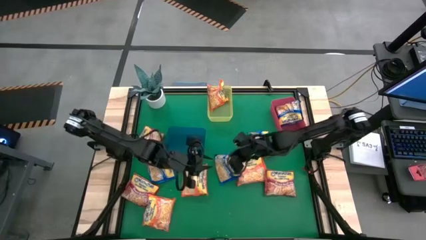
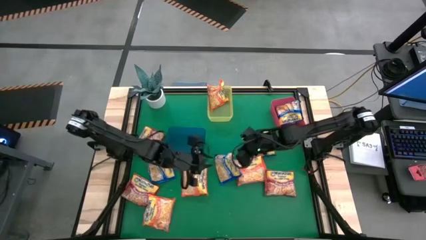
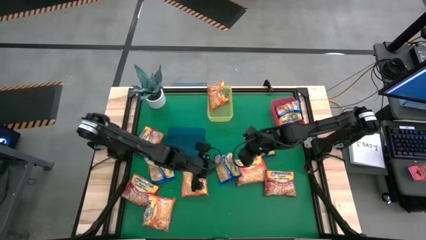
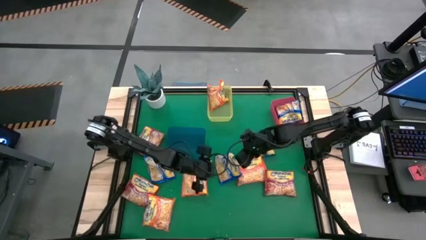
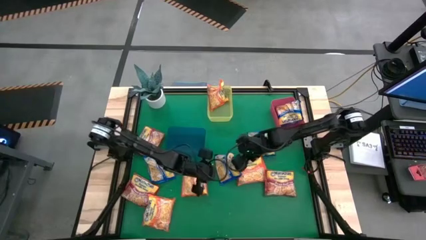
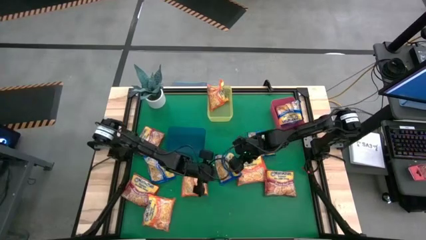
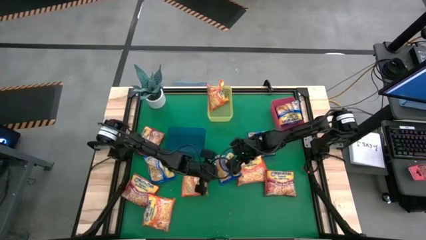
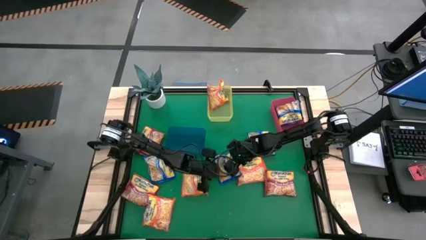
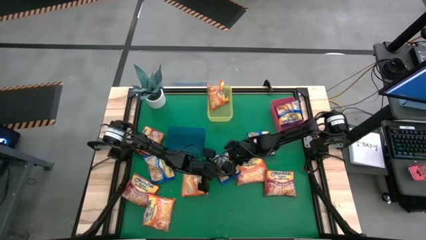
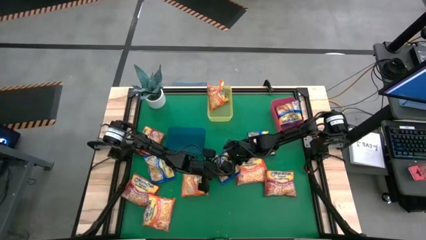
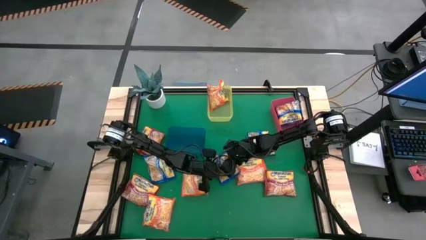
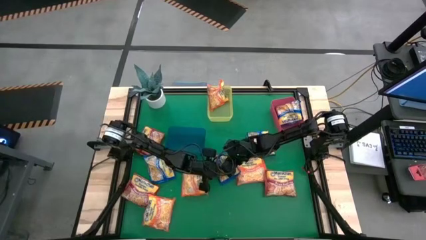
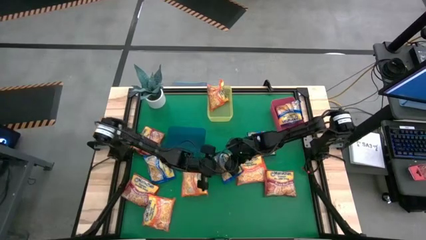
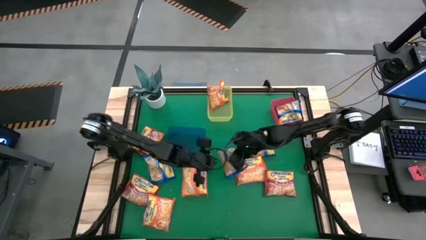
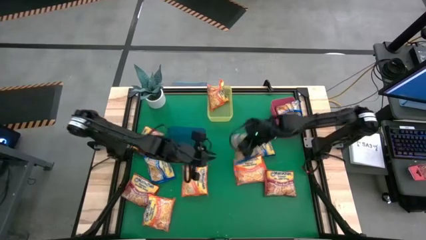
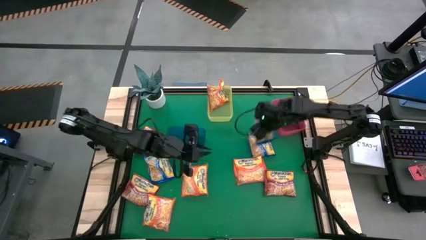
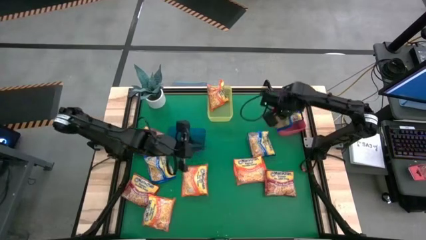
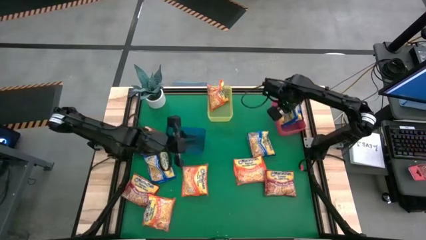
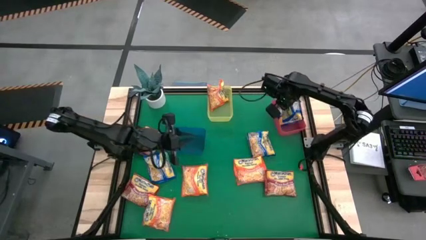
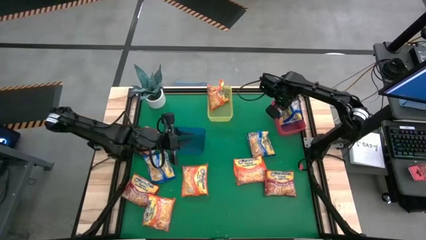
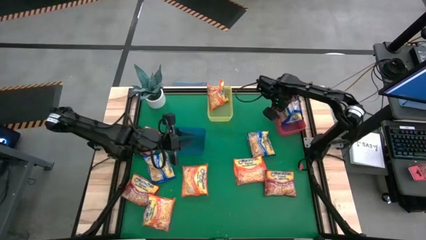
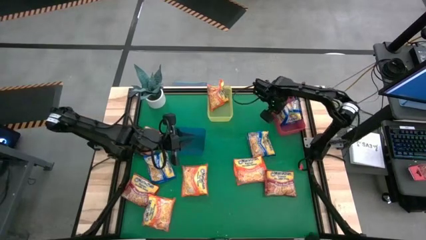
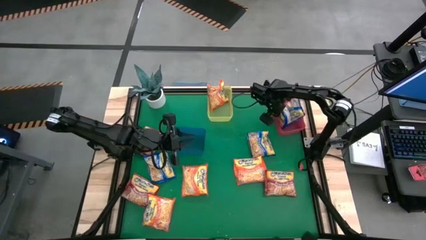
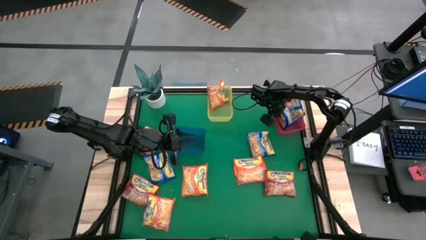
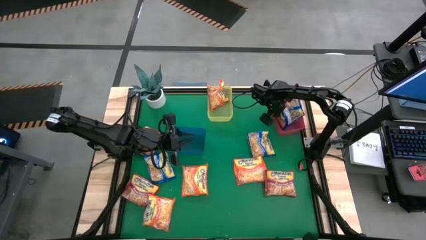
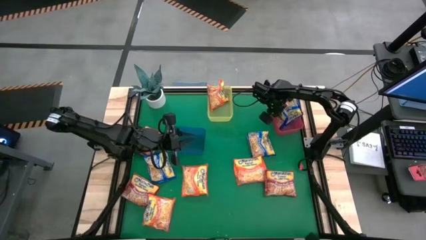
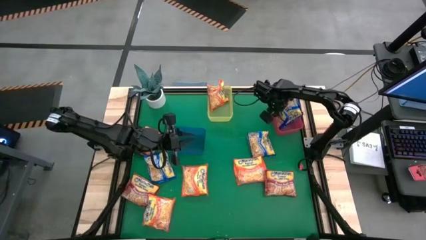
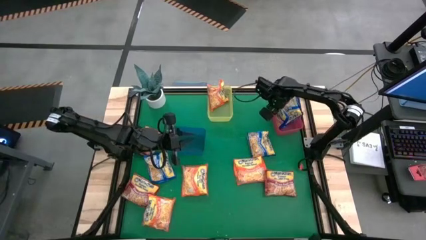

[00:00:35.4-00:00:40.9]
Task: Sort Maruchan noodles
Put the blue noodle pack into the red bin

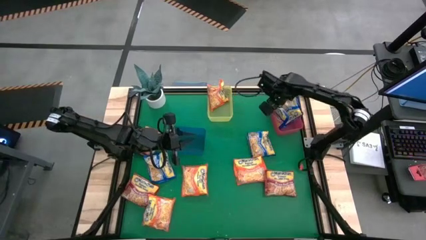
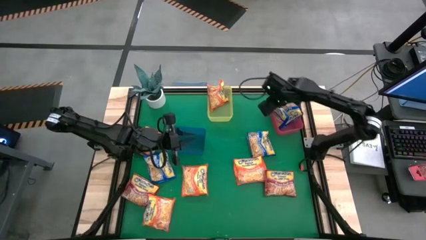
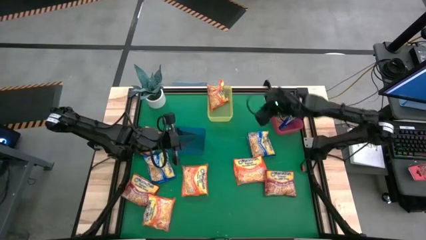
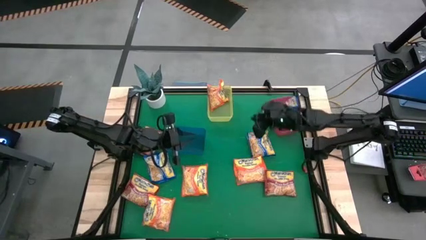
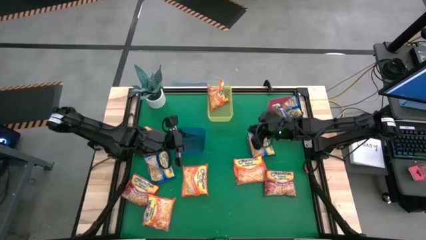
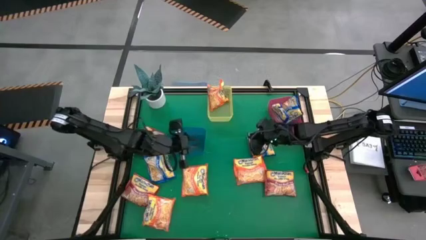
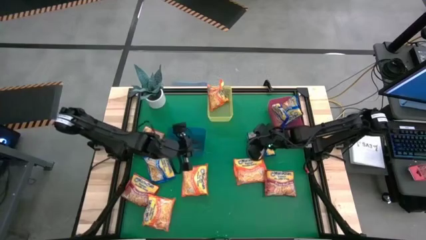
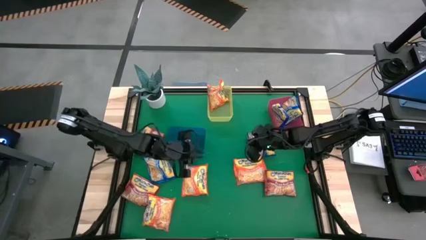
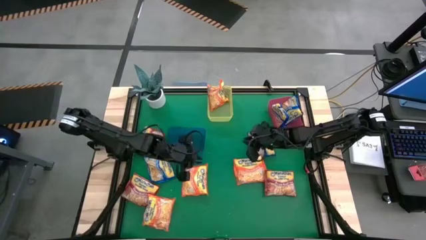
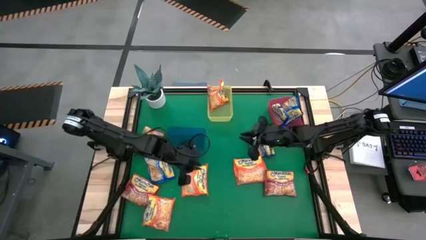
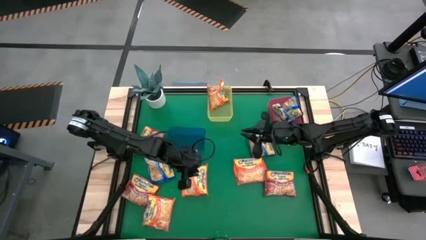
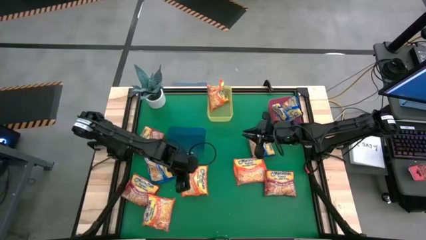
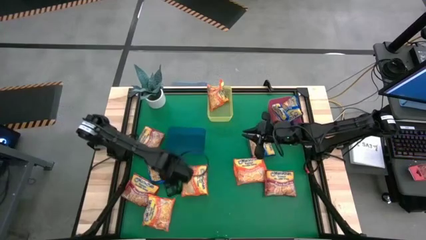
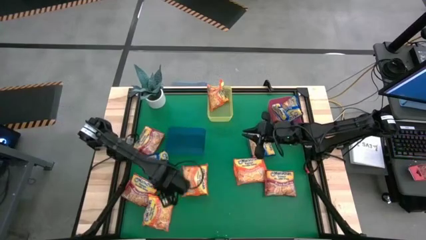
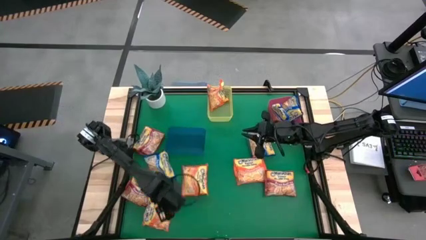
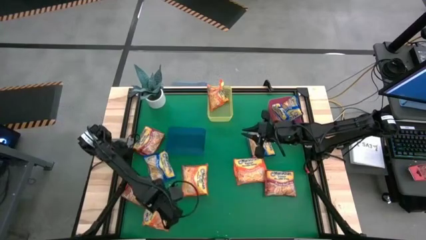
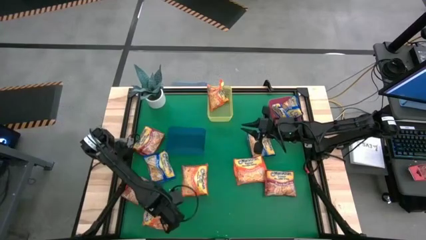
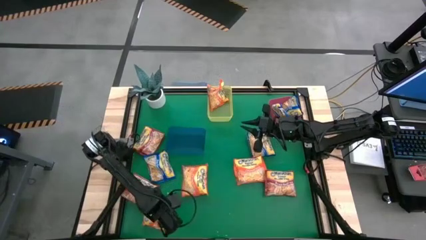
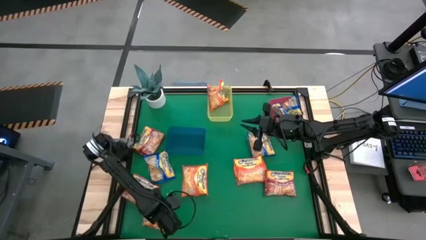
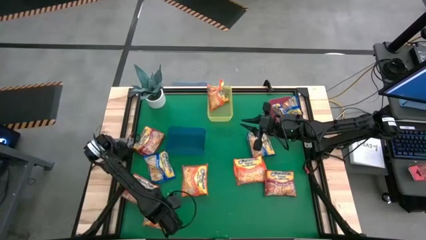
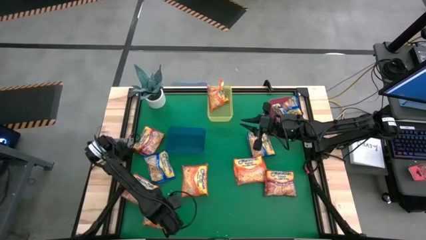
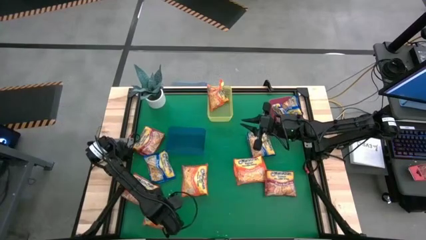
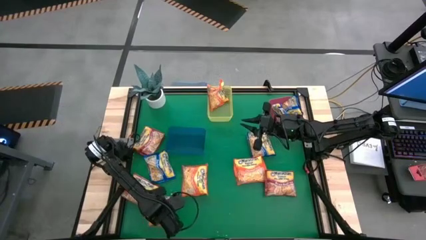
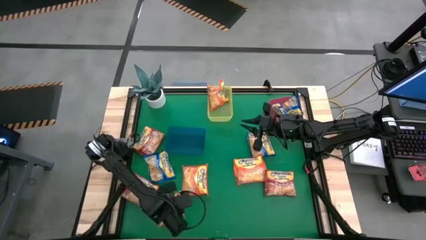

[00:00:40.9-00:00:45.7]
Put the orange noodle pack into the yellow bin

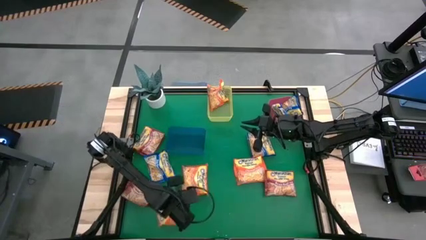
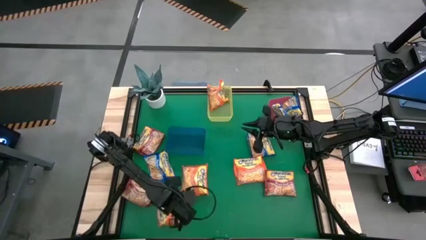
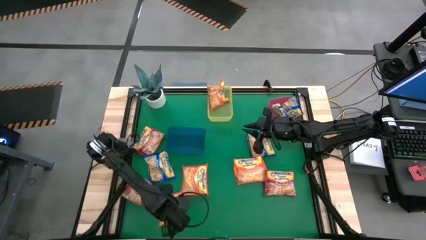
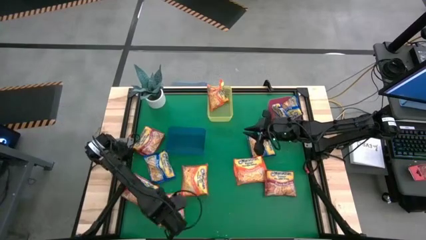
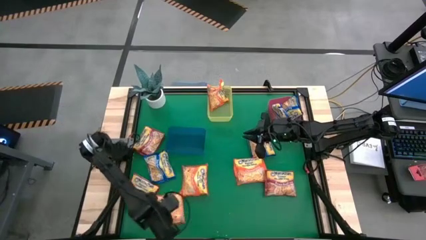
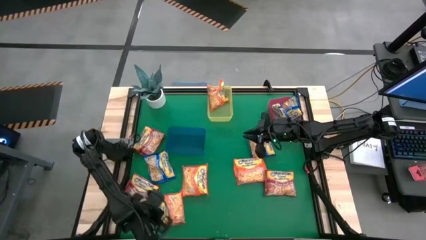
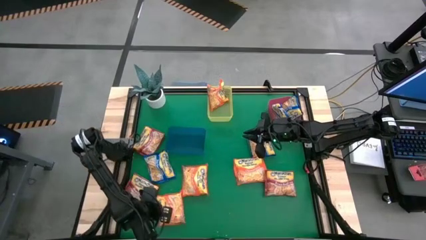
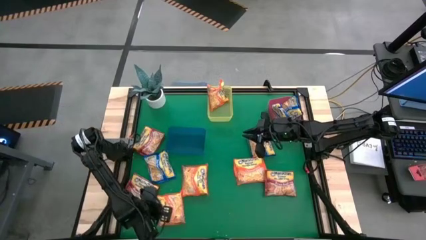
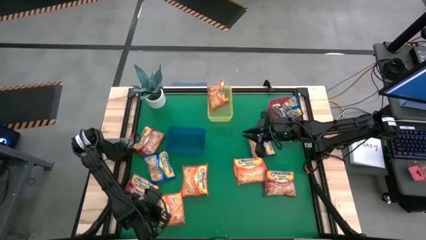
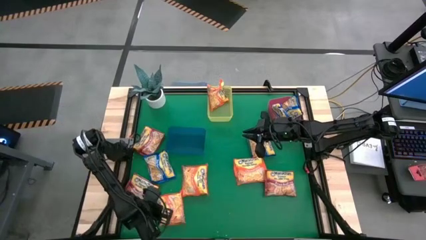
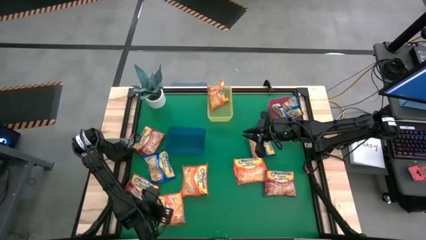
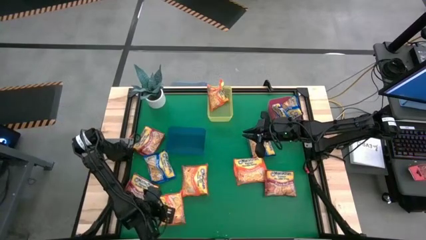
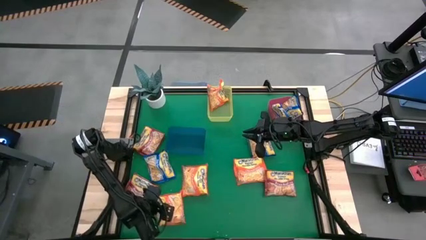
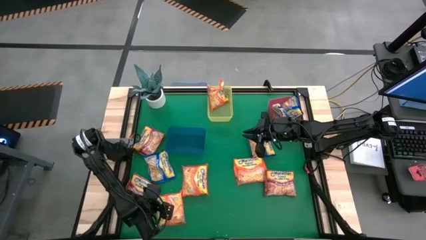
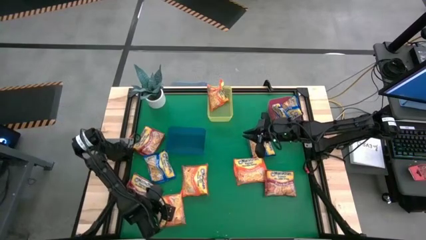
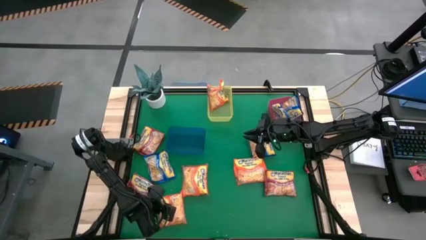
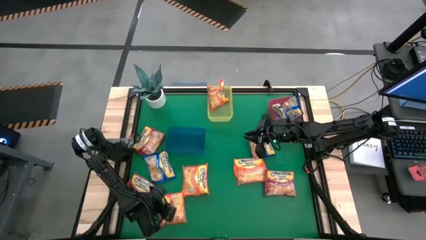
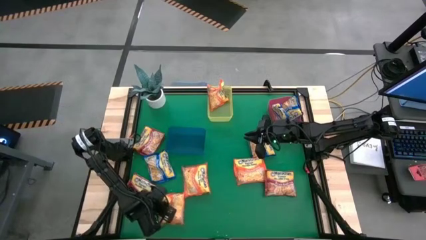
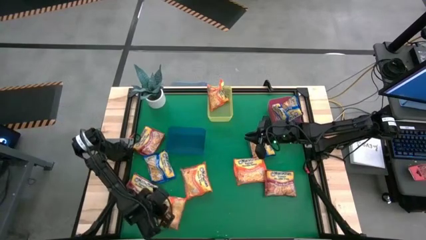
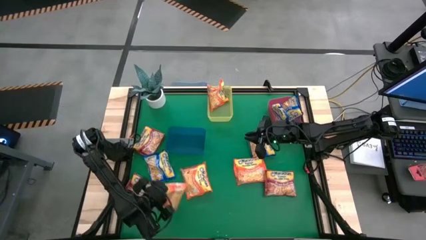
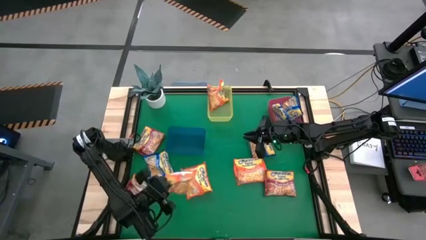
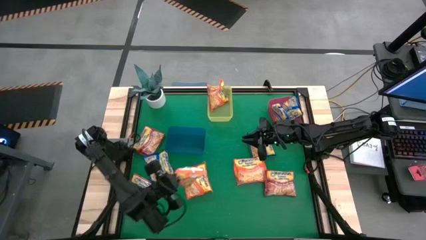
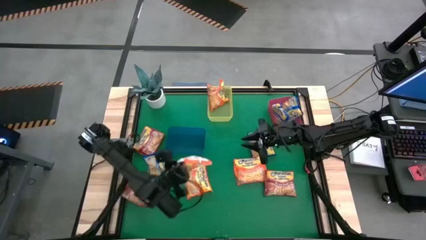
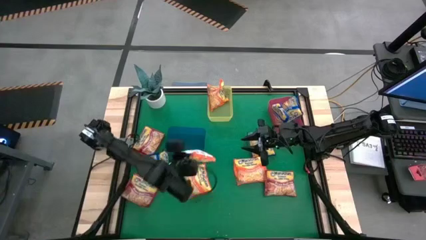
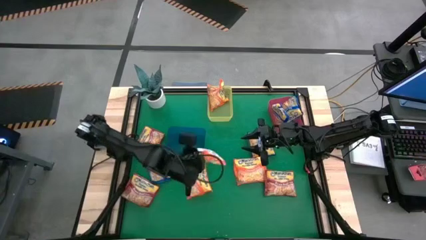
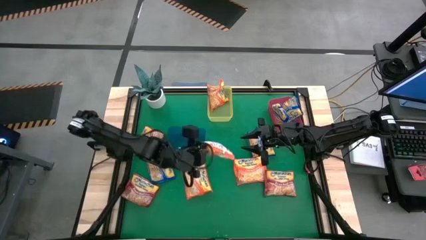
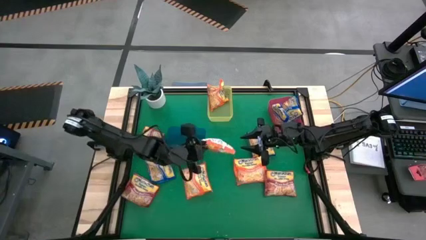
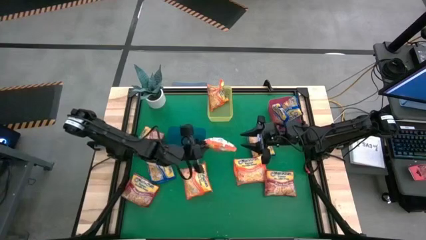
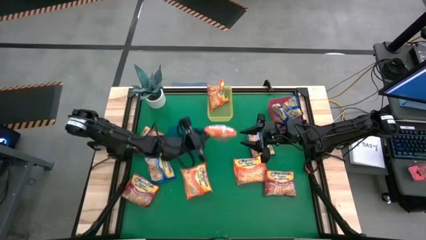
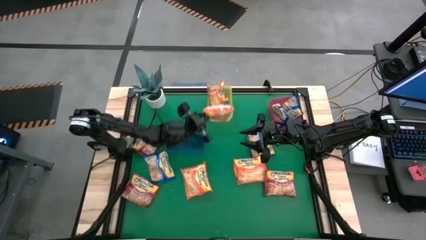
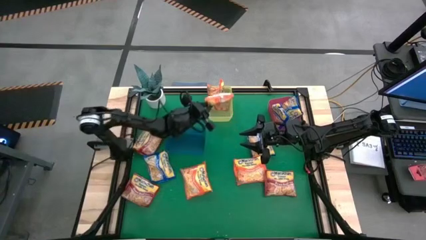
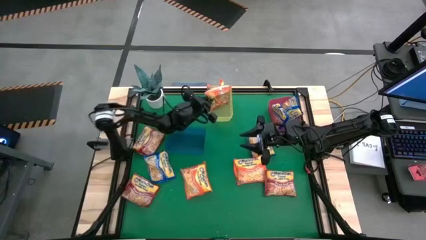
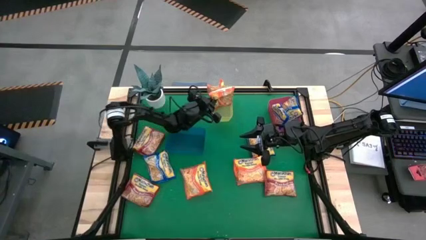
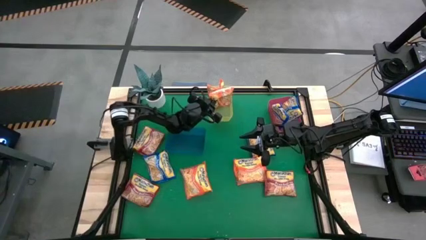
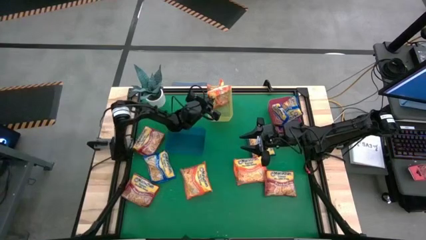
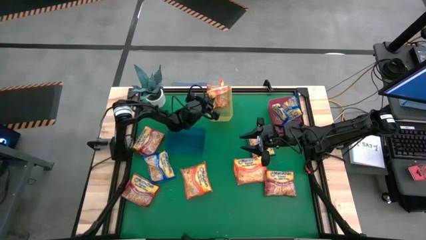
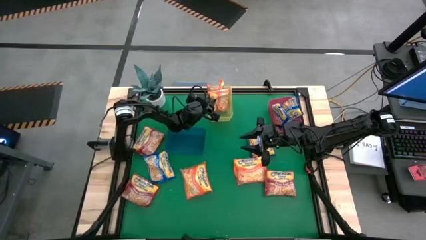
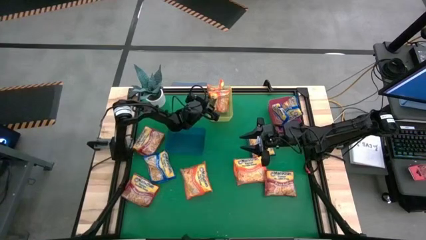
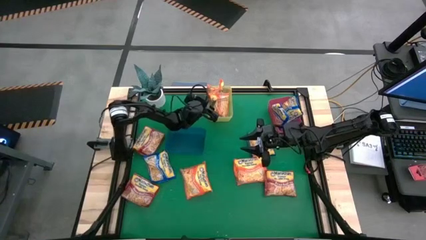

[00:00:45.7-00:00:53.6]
Put the orange noodle pack into the yellow bin
